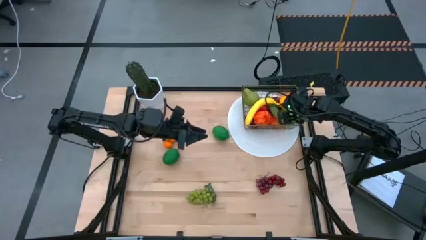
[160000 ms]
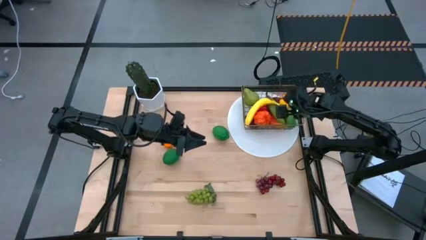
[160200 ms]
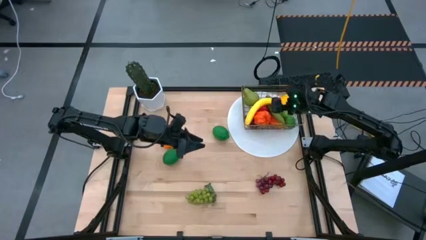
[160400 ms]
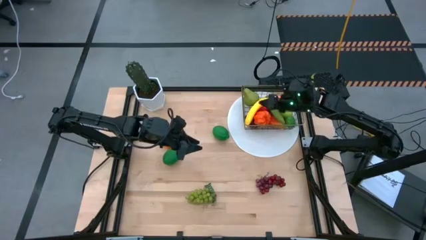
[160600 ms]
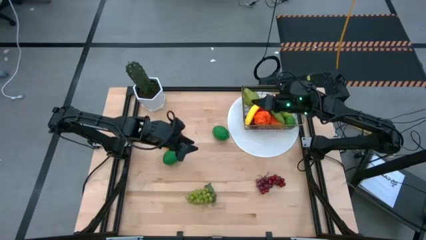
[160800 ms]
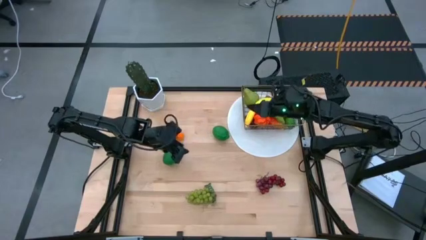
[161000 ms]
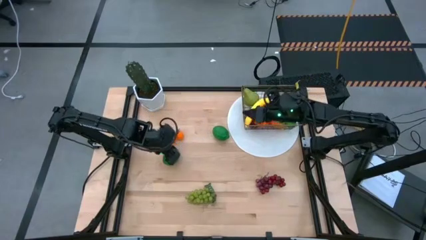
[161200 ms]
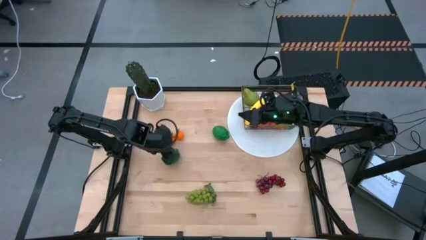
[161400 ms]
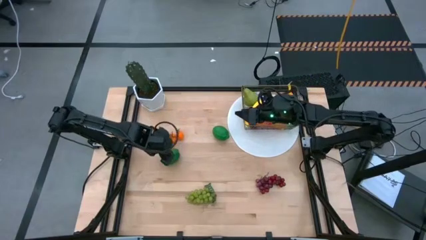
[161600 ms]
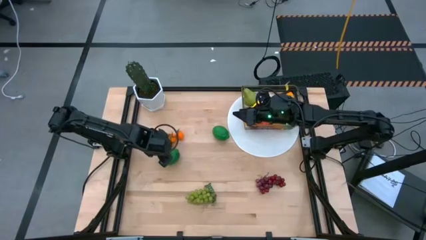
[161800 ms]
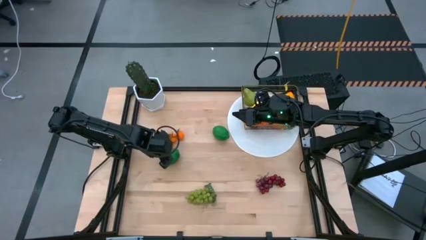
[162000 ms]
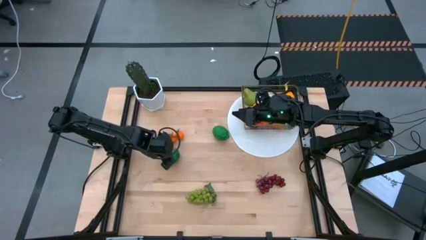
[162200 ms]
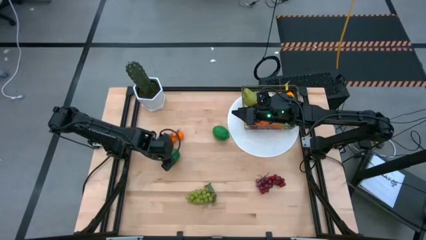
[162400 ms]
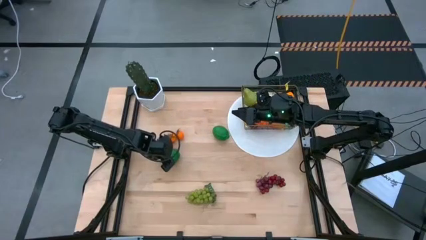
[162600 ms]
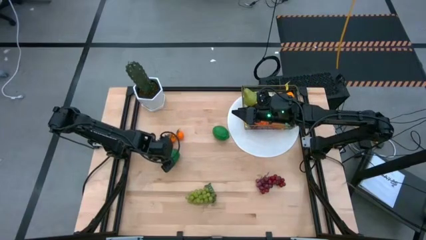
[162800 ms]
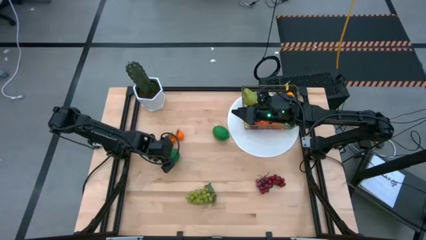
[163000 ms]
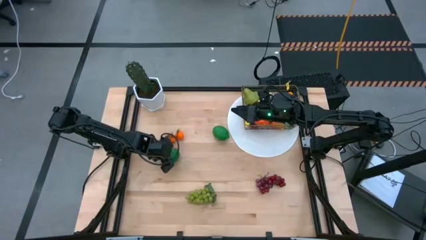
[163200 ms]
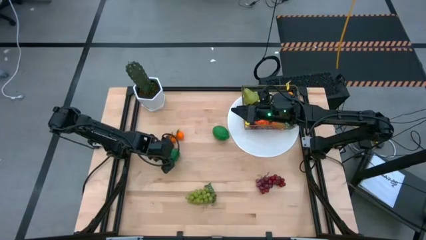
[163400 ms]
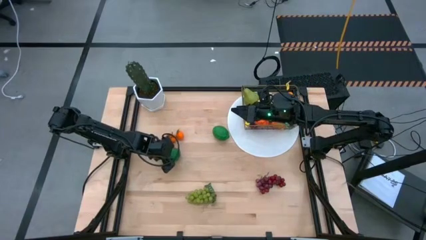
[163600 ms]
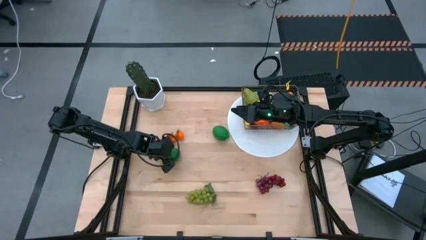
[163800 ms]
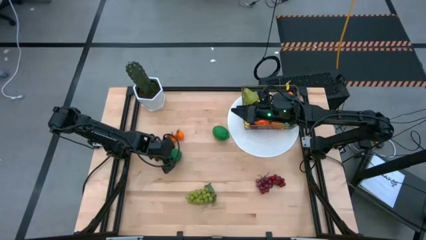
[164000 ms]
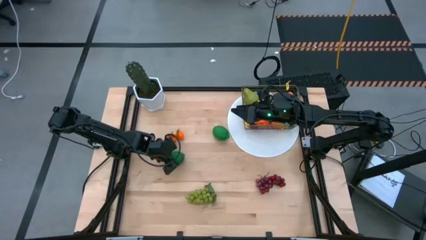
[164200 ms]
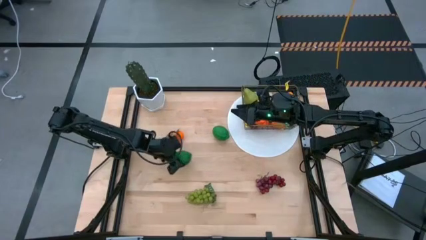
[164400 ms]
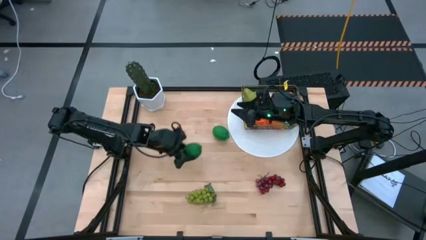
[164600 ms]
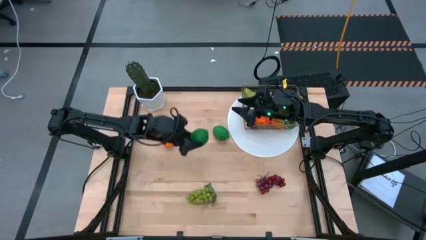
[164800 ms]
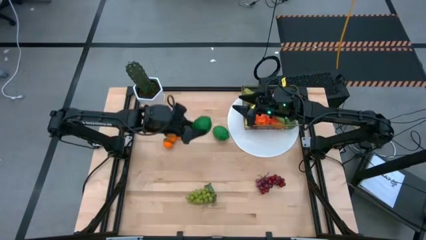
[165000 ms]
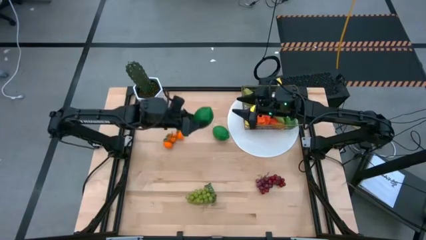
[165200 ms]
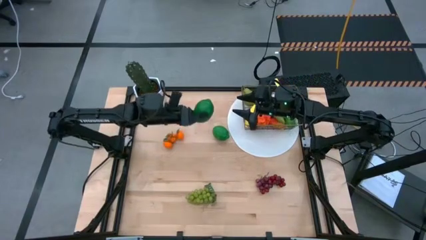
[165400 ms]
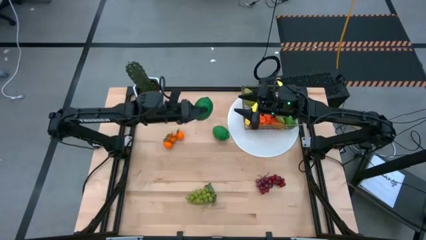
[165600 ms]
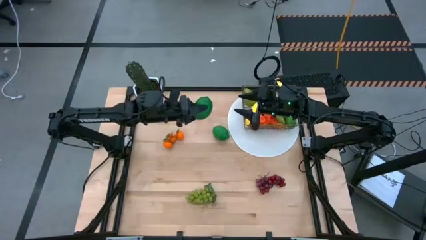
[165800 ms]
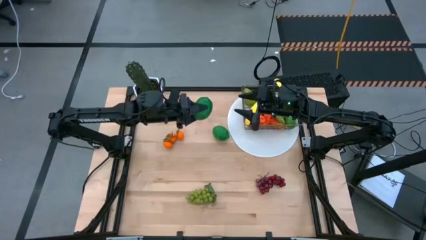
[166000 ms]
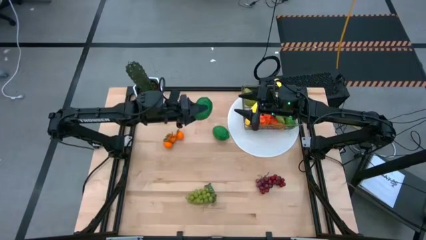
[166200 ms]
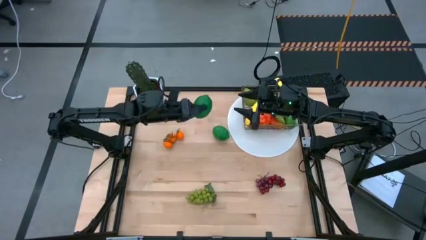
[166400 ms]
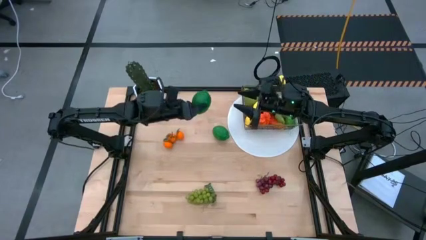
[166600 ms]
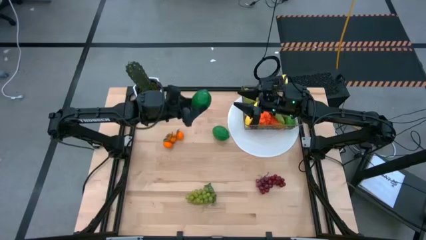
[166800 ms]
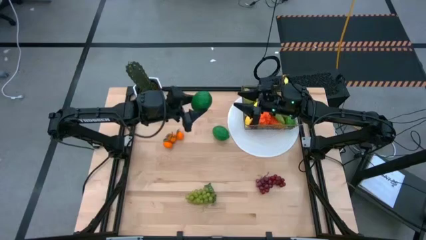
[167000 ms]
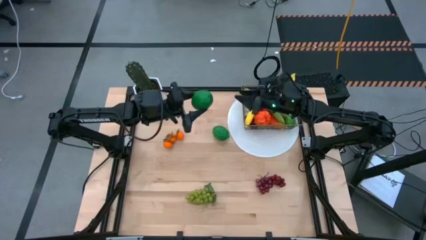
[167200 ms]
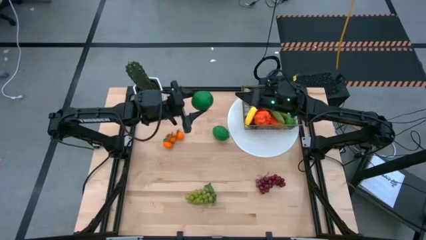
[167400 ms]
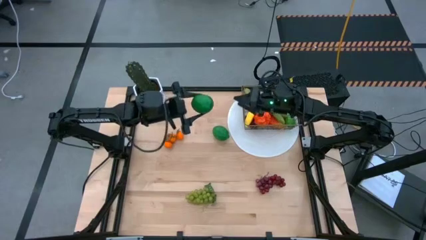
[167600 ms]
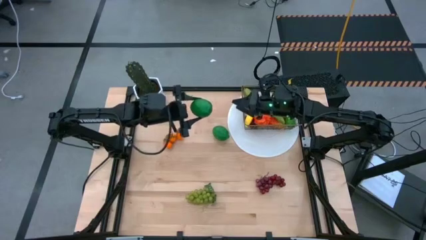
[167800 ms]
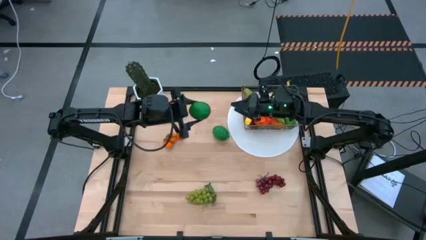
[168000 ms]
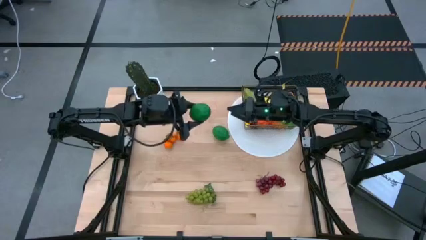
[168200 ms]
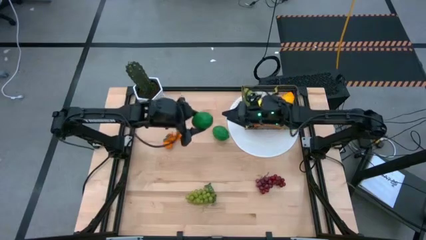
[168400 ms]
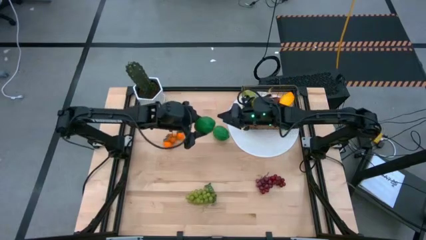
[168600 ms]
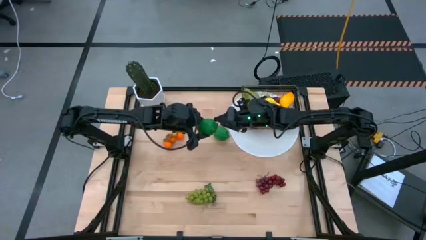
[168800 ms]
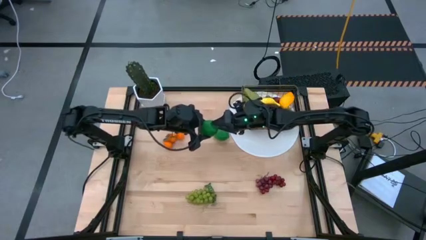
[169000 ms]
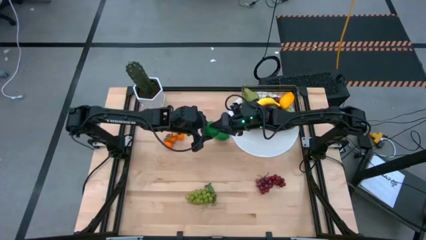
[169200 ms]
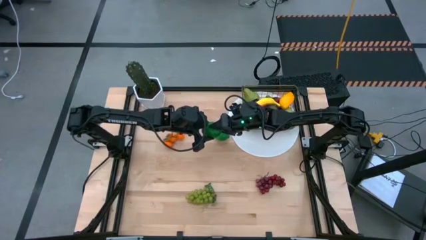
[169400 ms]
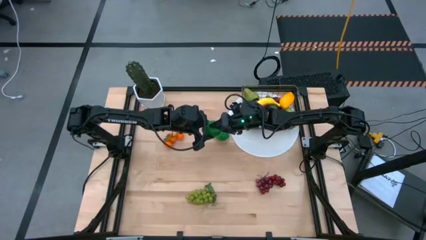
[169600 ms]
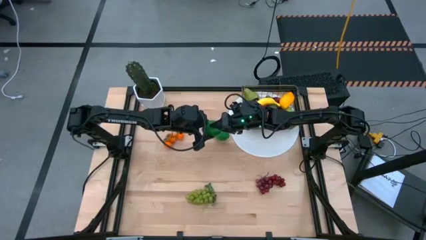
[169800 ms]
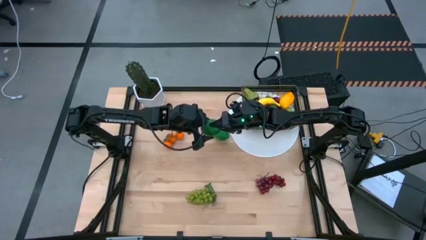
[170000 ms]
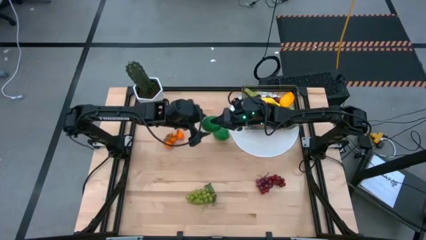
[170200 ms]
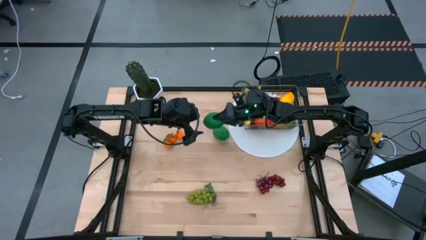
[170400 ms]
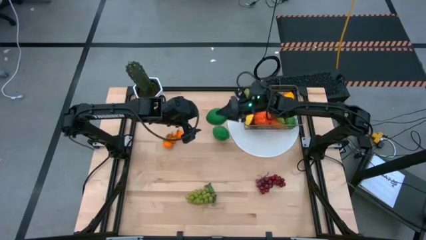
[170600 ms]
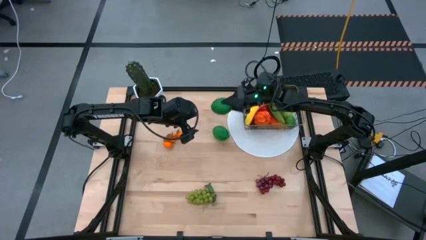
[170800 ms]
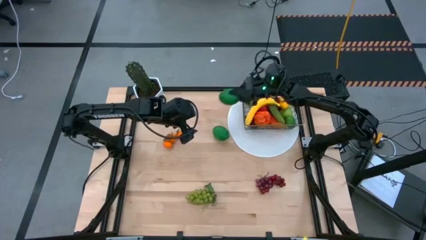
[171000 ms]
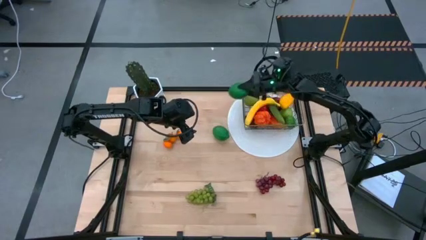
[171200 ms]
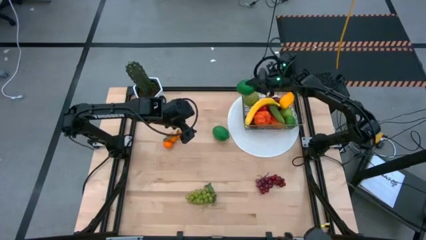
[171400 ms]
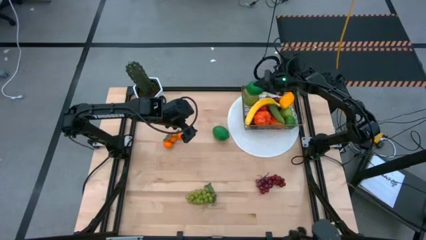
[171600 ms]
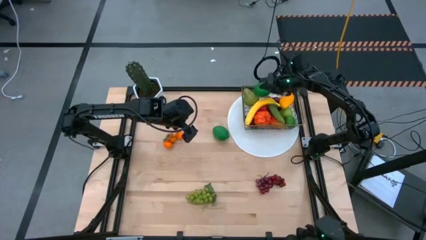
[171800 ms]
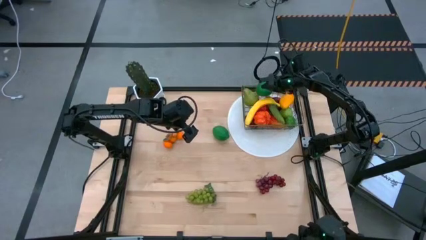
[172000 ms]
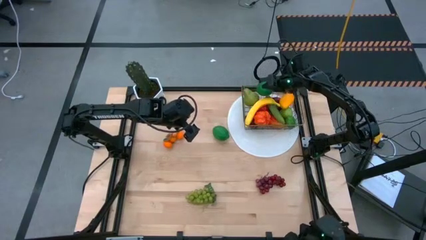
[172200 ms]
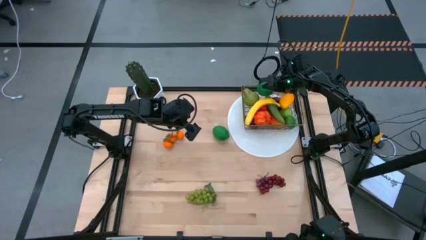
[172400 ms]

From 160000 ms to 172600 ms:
Task: Build produce basket
Put the bottom green lime into the gold wire basket
